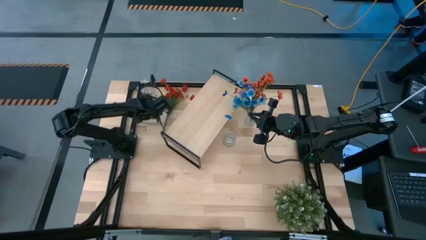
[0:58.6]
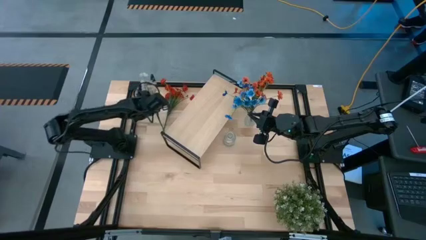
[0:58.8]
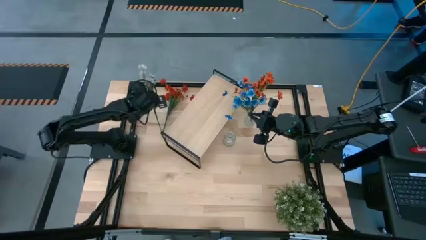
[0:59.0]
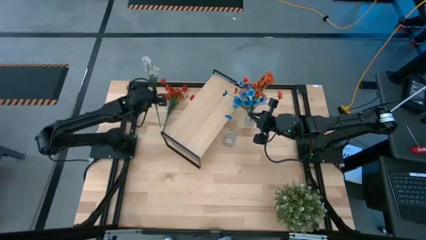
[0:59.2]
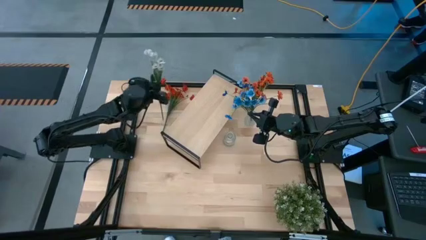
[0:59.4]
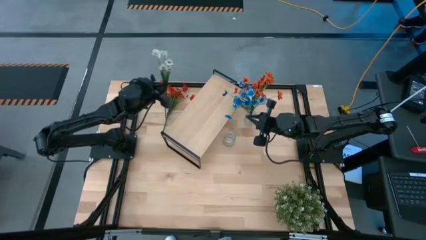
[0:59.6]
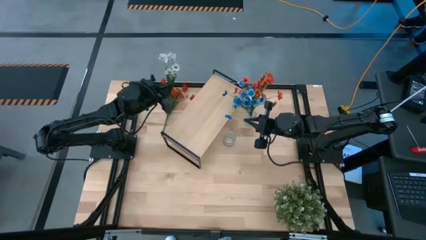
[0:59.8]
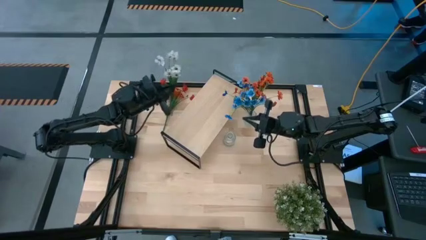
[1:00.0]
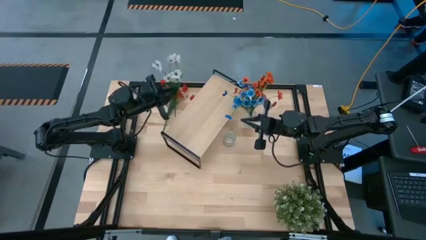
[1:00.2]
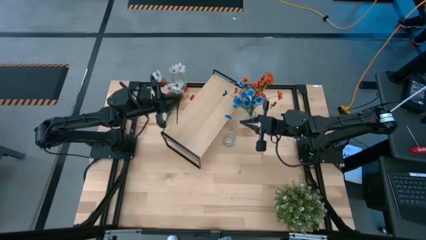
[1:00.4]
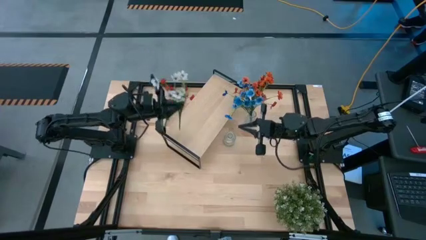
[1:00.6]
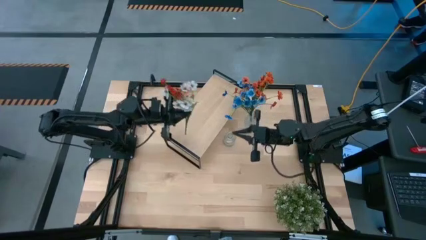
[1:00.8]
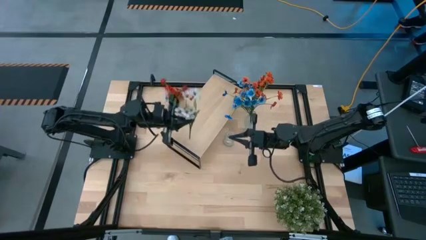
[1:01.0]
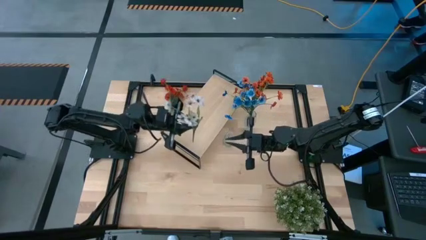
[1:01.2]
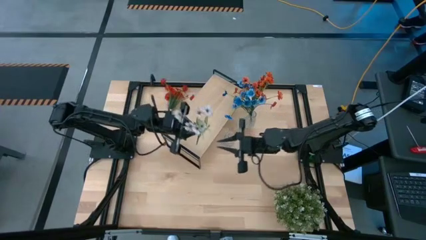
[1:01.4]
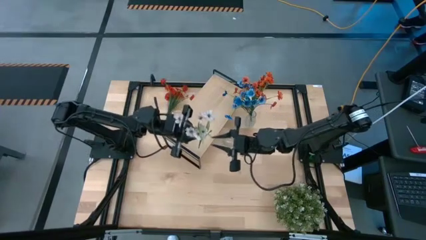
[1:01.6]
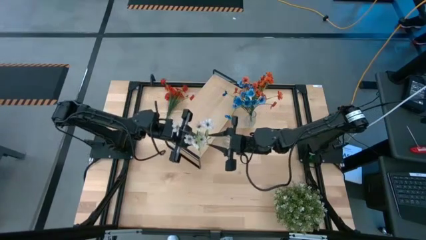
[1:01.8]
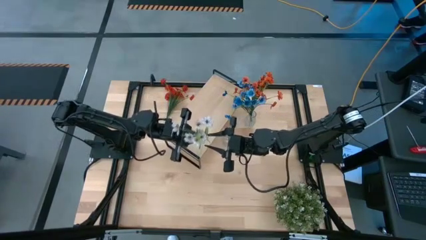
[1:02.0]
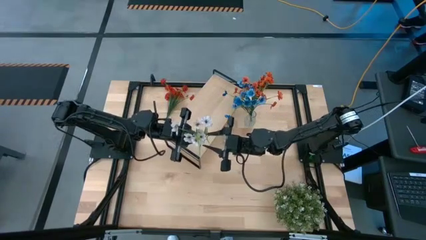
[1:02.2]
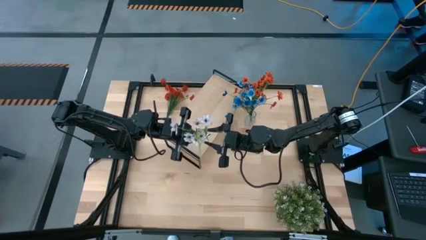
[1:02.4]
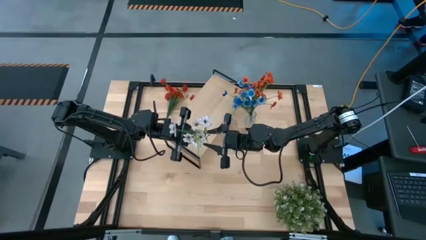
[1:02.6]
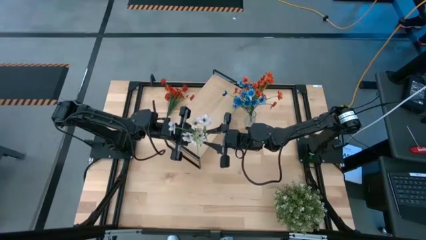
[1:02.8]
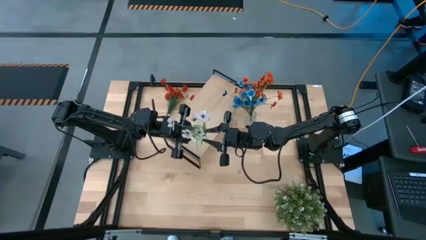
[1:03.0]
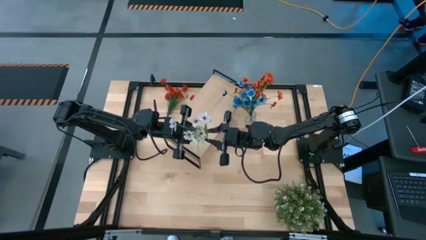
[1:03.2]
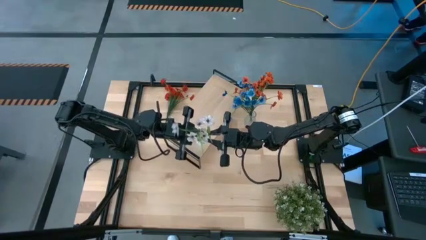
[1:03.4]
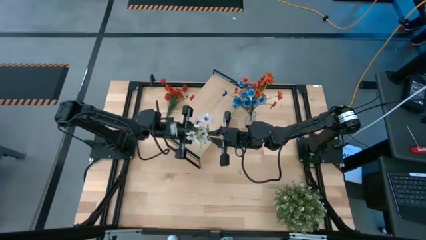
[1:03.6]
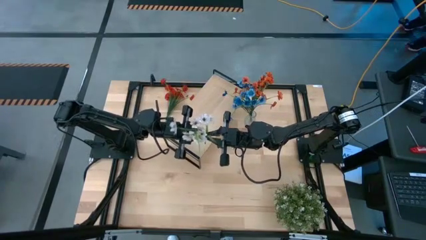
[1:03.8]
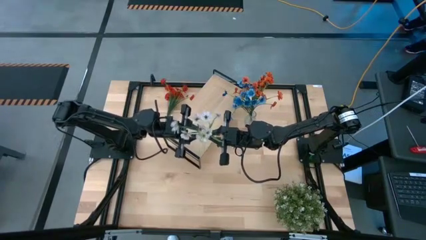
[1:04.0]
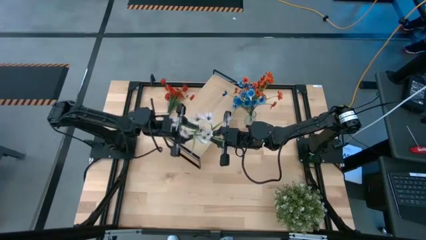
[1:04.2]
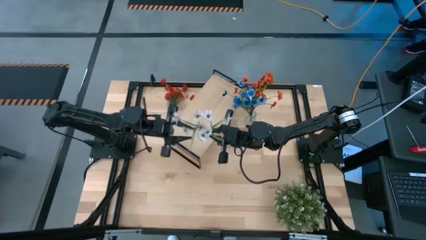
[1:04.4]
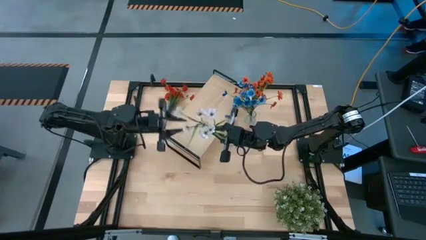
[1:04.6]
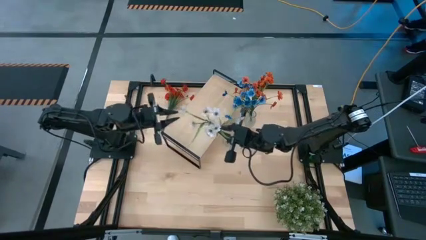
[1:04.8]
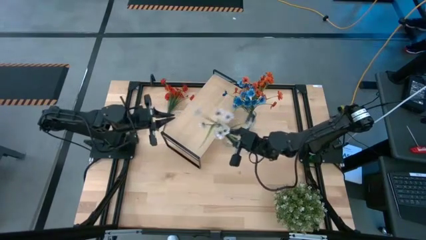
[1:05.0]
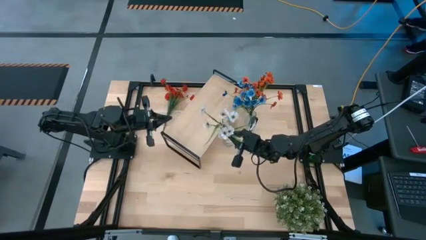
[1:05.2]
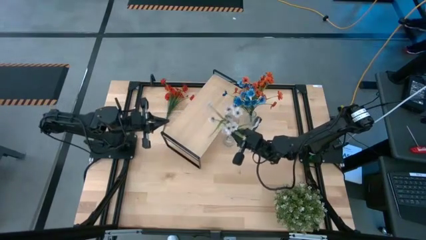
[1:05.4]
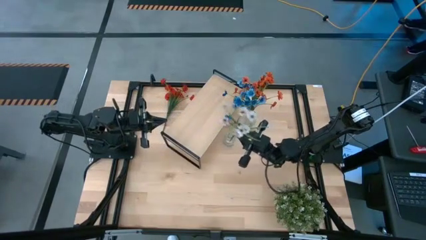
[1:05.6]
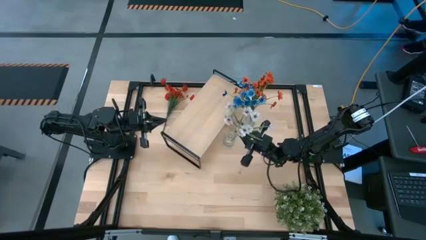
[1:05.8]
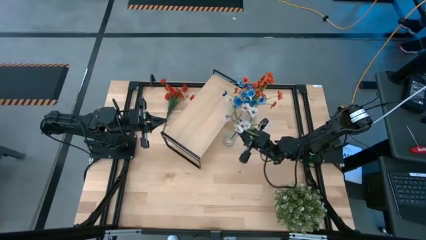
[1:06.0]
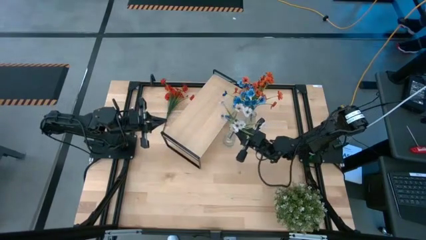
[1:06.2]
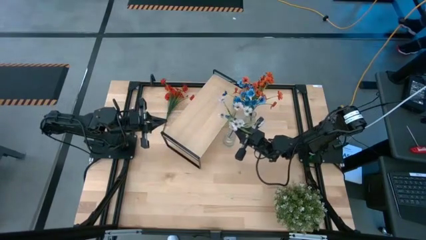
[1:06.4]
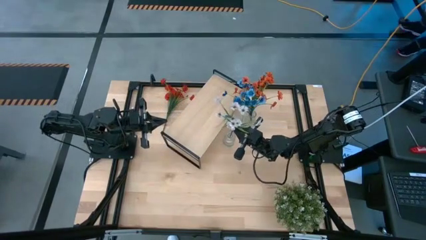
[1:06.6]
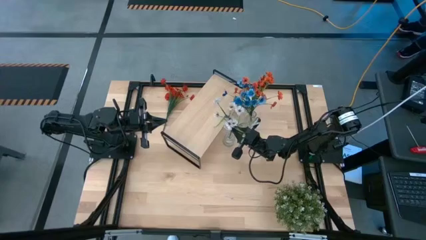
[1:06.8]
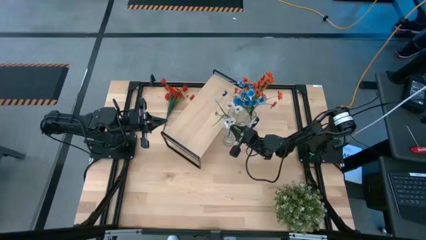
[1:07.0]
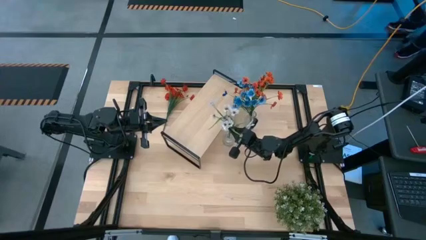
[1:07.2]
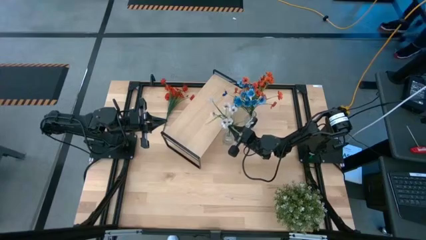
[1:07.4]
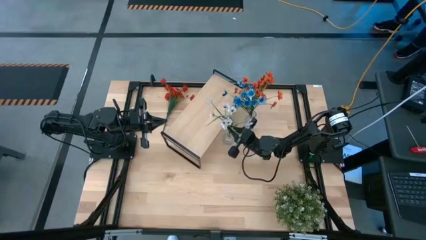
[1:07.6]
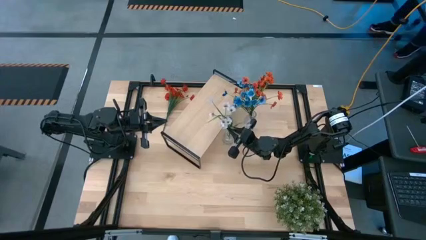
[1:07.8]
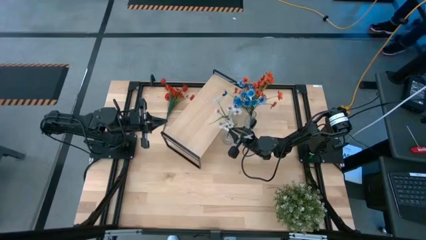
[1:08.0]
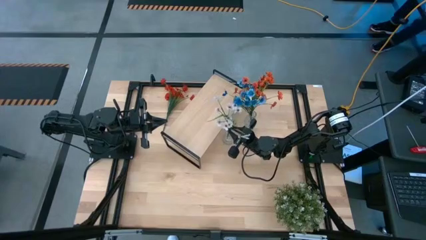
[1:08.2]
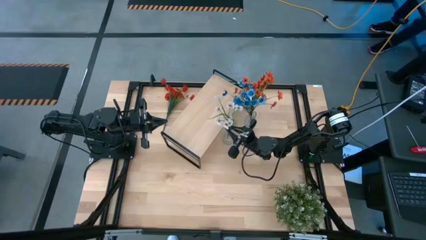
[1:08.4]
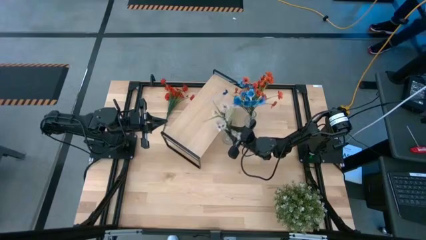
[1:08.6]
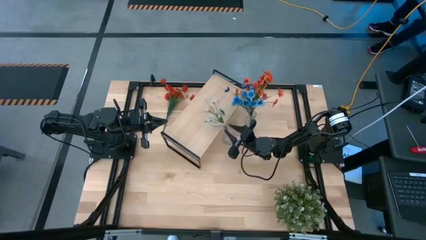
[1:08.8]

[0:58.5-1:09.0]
Task: Pick and place flowers into a vace then onto a shelf
Put the white flowers into the left transparent vase

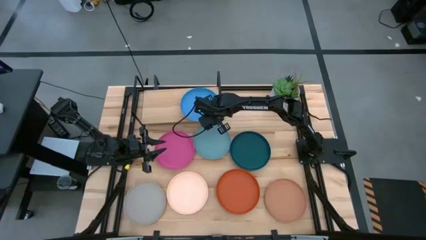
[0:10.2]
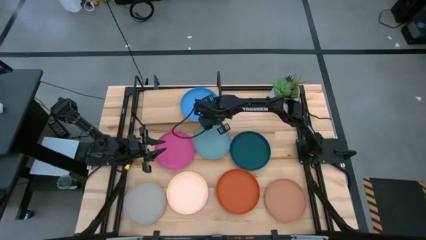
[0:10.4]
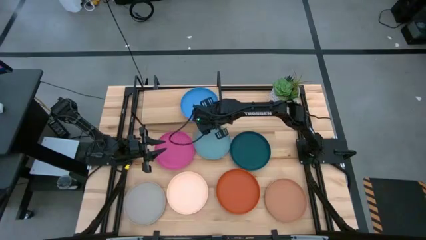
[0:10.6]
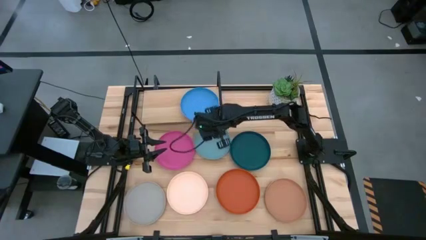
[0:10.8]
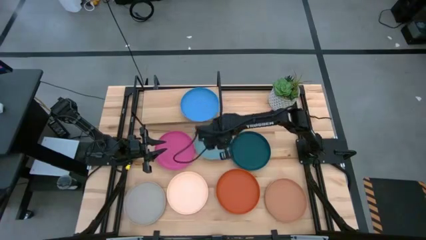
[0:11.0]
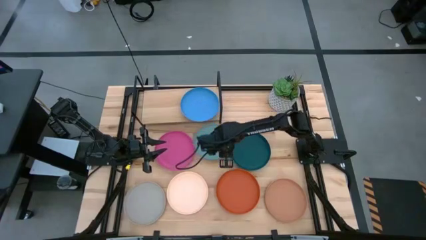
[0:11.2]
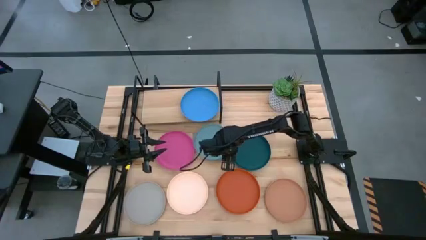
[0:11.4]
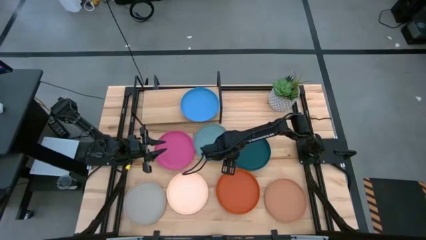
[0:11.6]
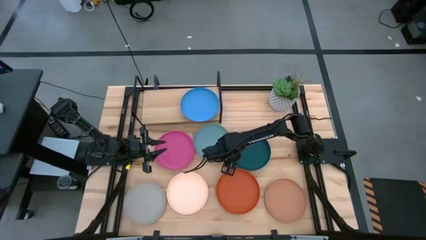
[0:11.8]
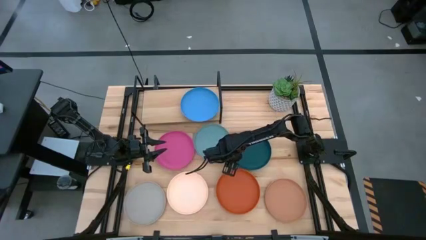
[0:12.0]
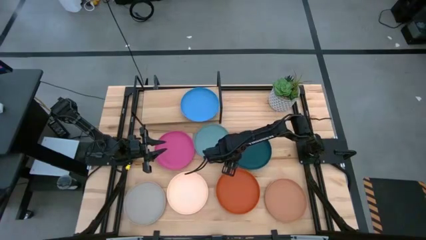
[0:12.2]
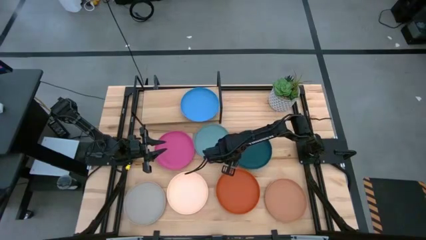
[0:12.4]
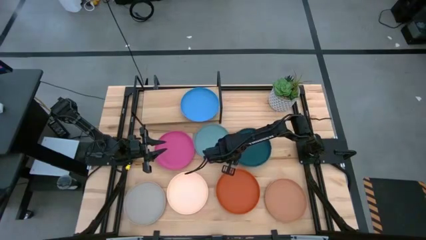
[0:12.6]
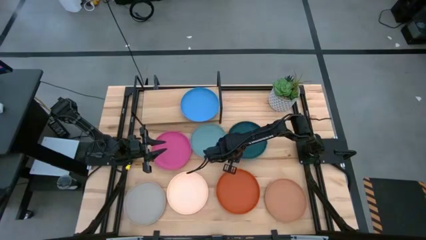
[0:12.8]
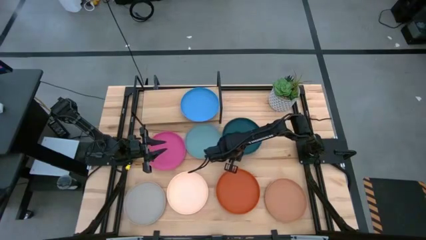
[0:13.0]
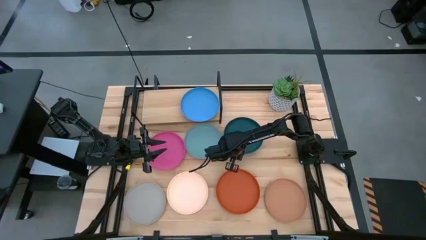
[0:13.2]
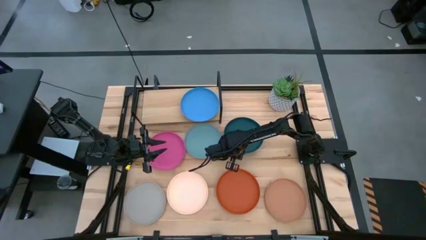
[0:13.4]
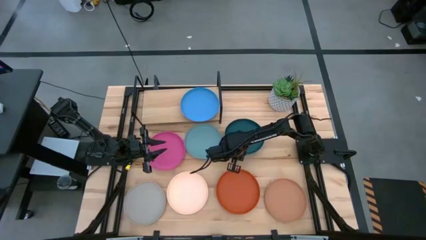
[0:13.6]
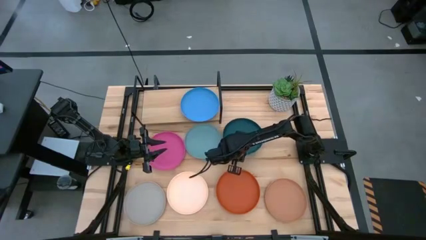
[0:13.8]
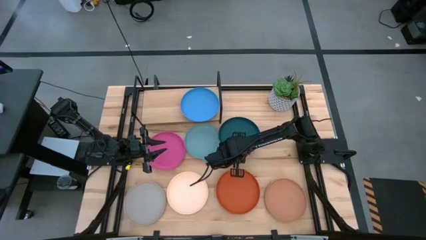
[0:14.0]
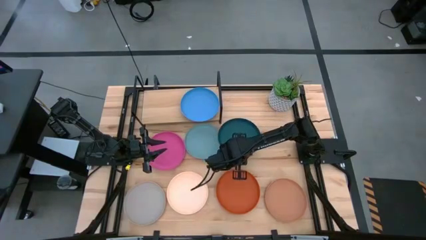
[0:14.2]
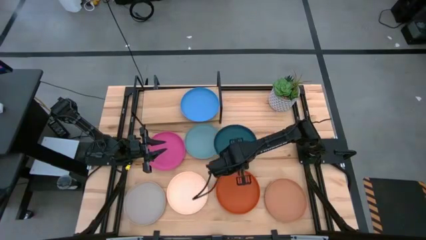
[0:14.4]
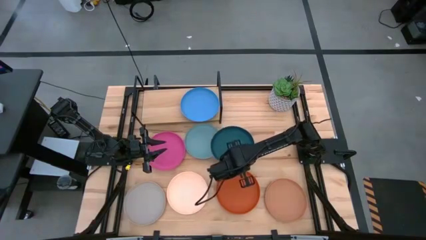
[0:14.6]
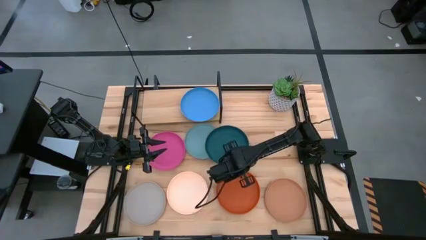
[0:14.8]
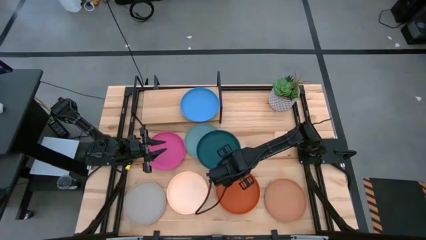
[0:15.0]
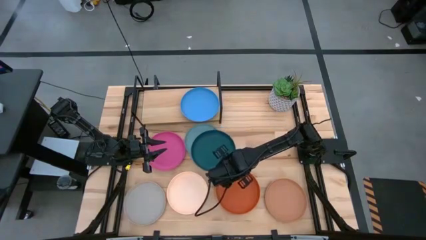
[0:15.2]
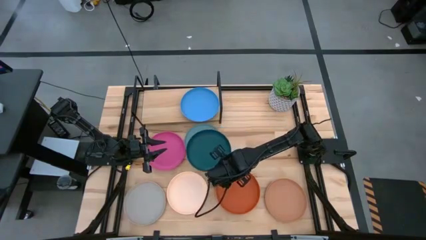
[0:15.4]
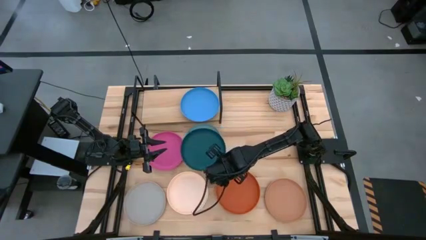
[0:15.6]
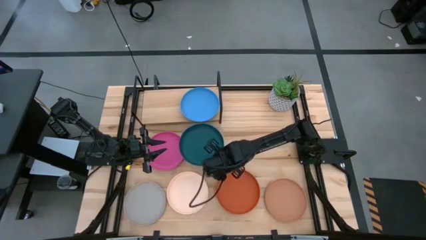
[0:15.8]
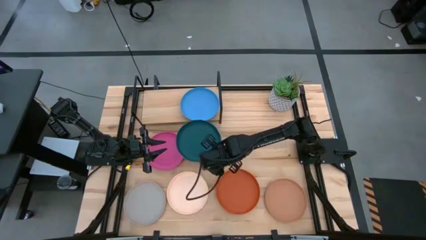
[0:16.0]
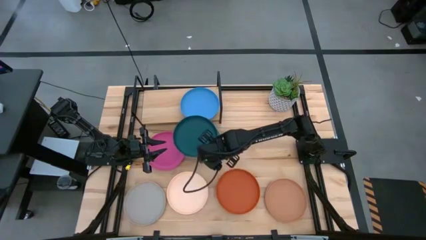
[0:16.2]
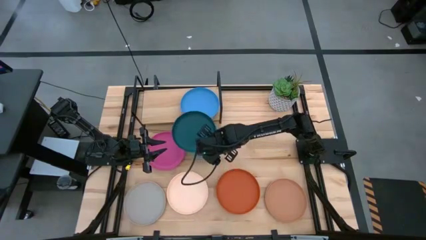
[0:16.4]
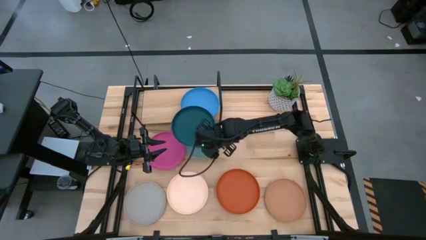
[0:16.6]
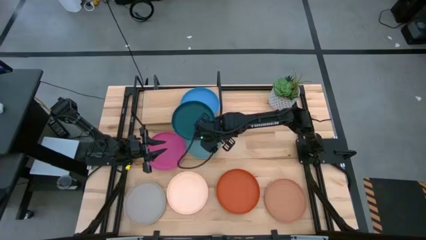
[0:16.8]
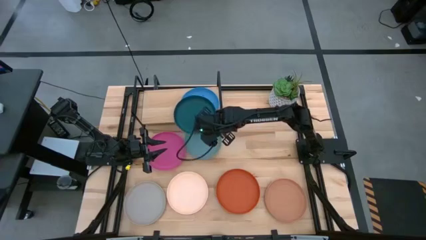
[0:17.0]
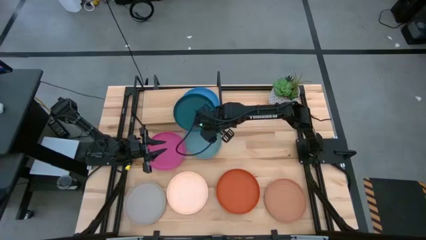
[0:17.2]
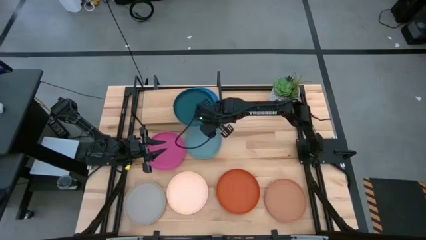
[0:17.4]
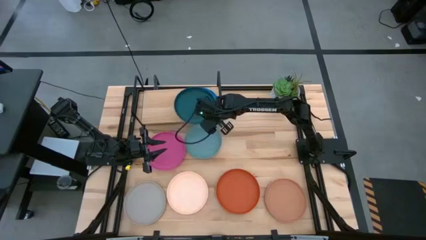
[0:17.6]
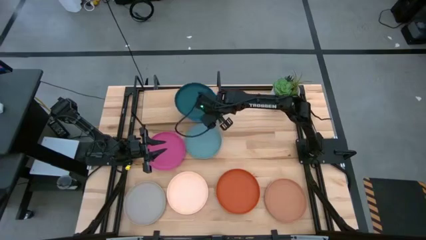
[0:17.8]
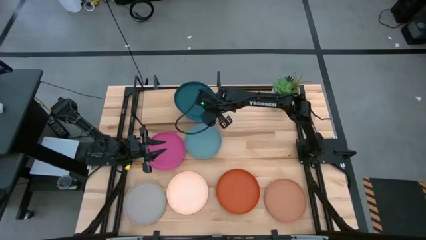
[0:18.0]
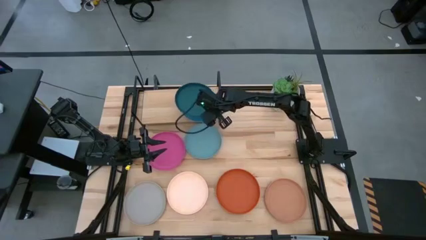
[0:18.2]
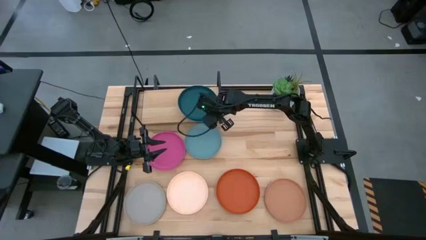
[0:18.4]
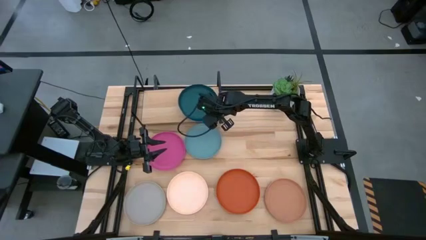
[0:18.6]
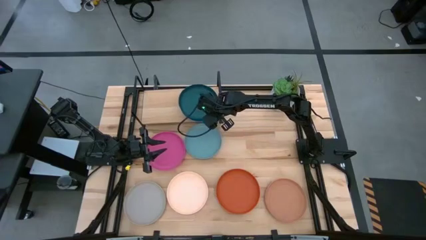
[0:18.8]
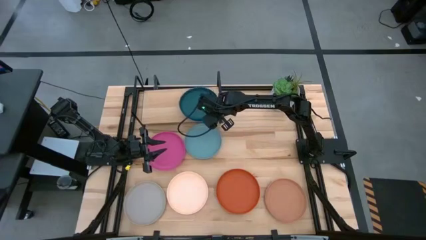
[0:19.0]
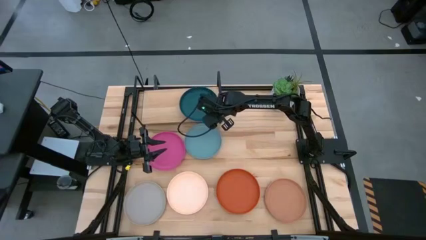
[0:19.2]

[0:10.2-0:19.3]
Task: Place and stack plates onto a shelf
Stack the dark green plate on top of the blue plate on the shelf
